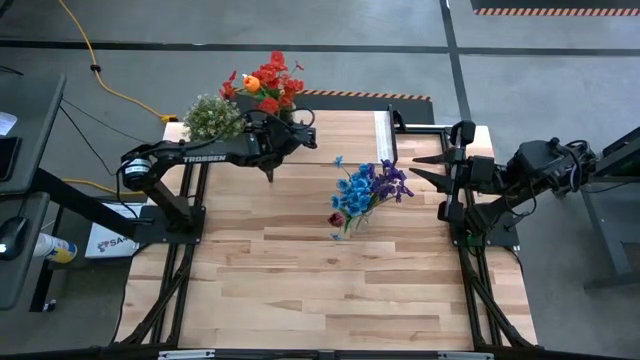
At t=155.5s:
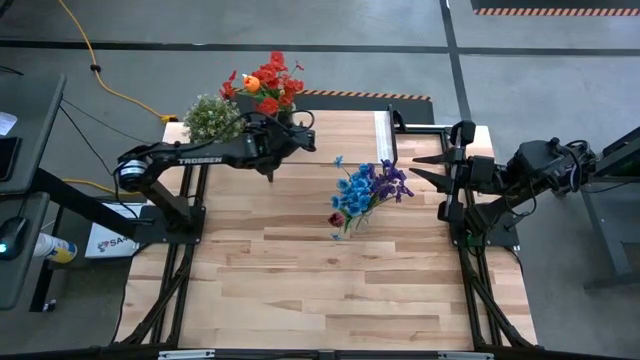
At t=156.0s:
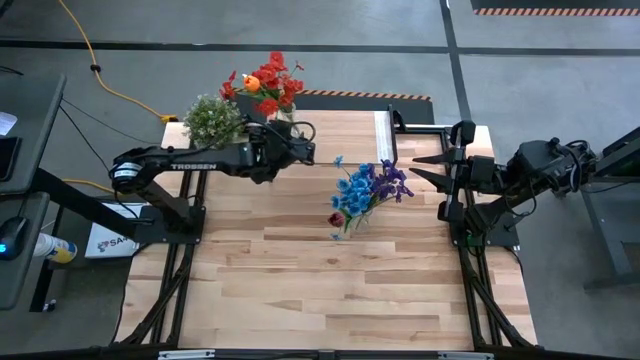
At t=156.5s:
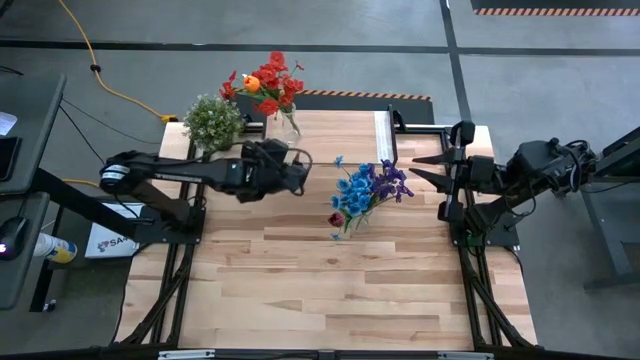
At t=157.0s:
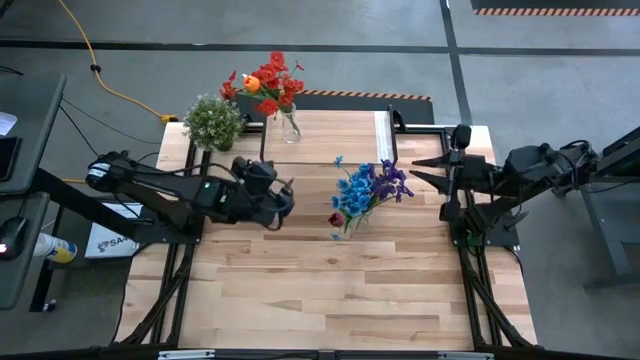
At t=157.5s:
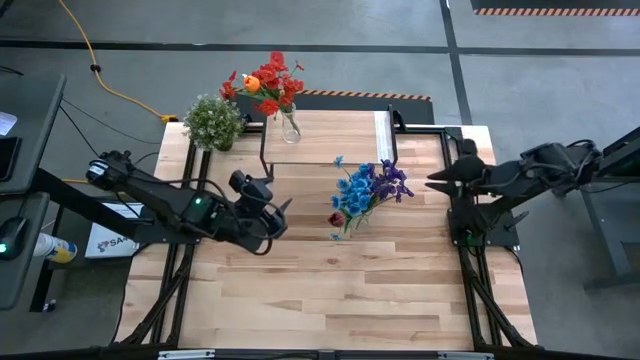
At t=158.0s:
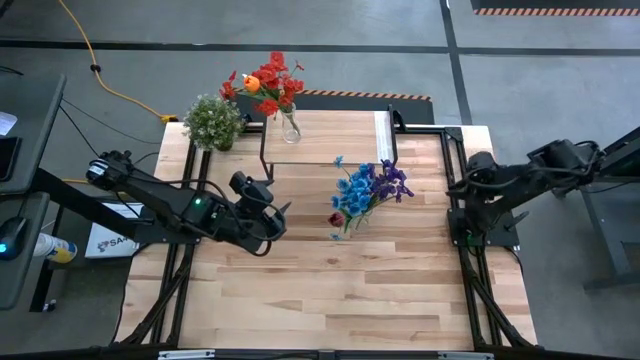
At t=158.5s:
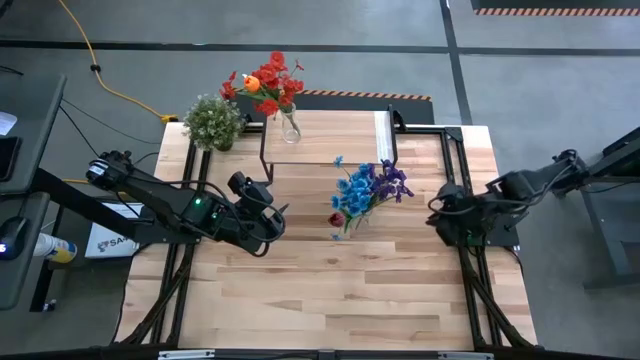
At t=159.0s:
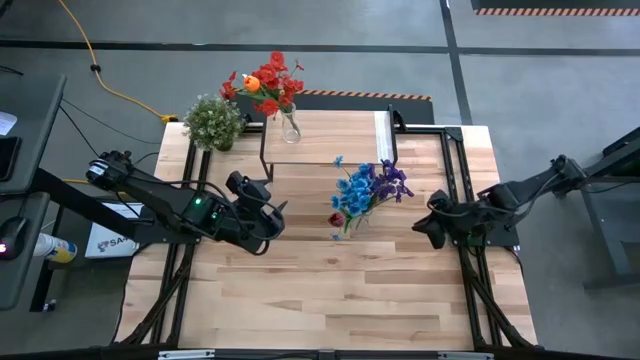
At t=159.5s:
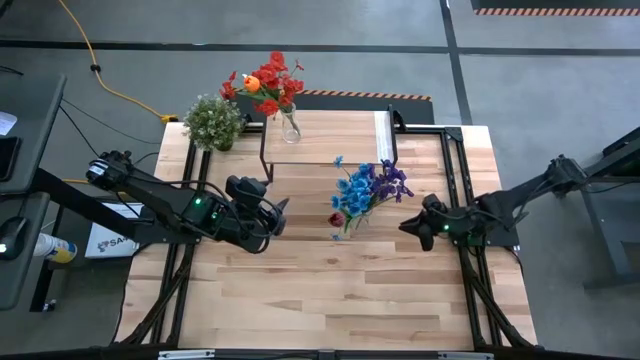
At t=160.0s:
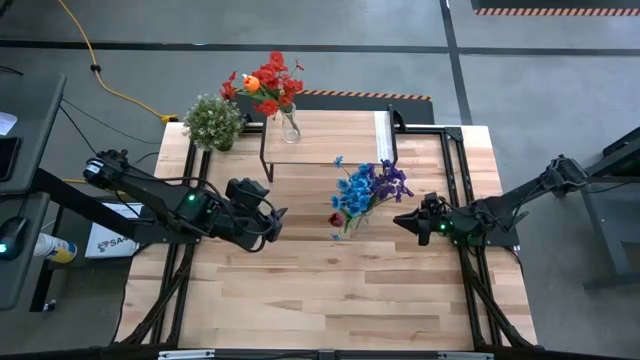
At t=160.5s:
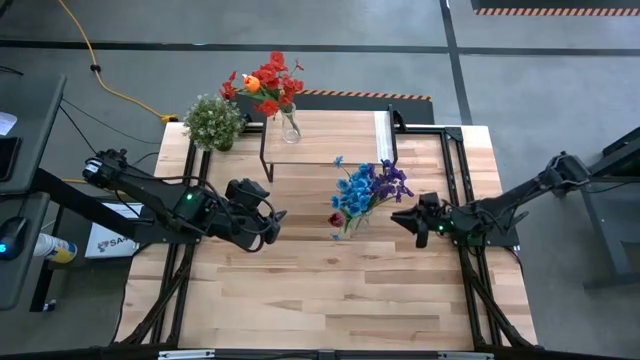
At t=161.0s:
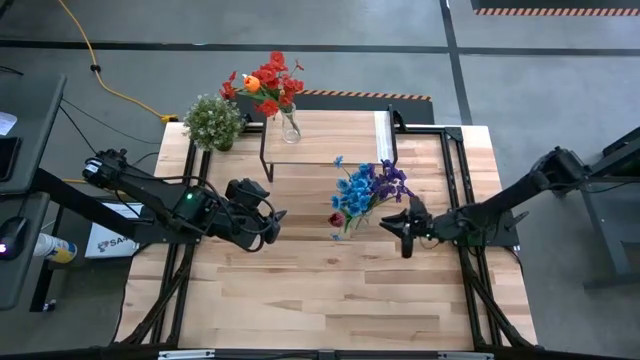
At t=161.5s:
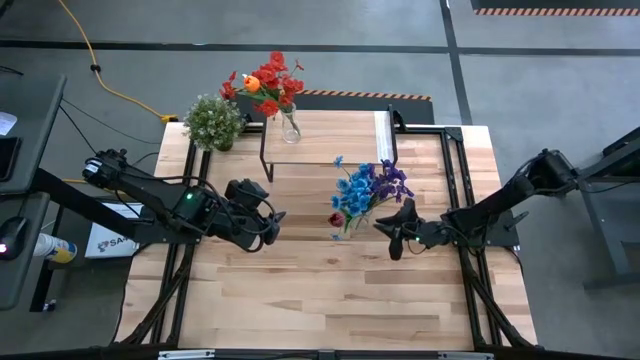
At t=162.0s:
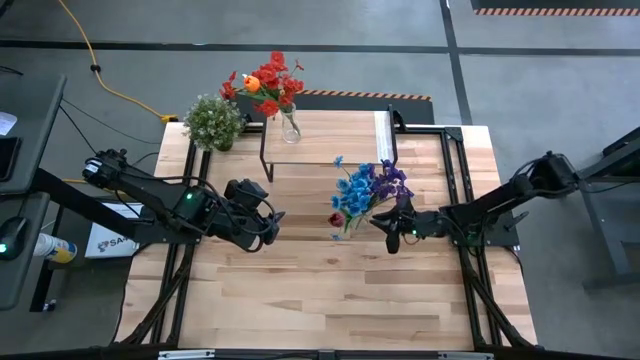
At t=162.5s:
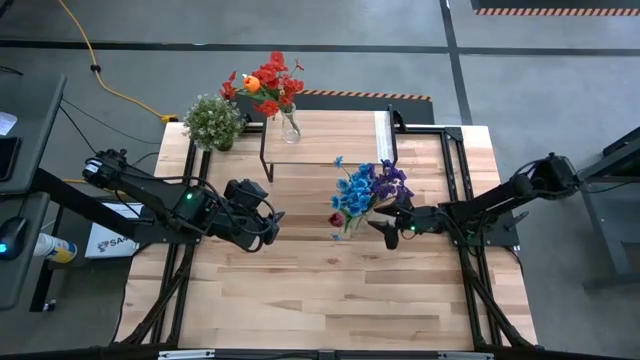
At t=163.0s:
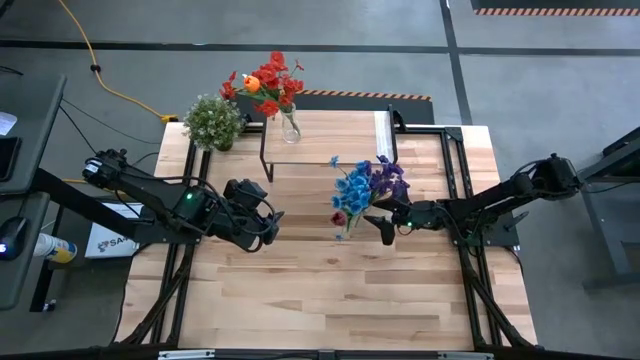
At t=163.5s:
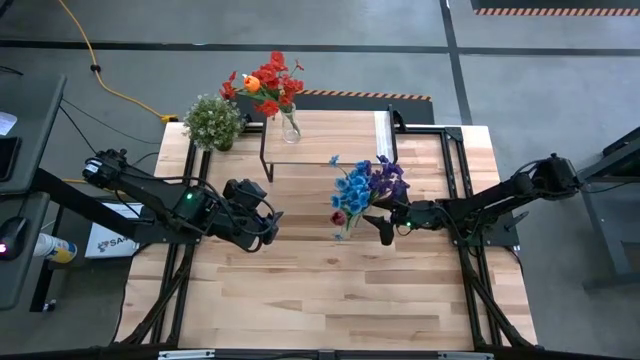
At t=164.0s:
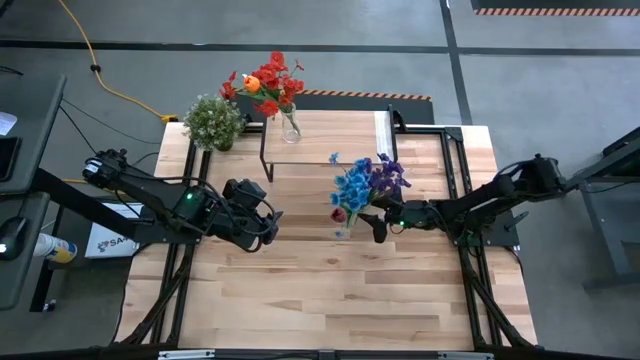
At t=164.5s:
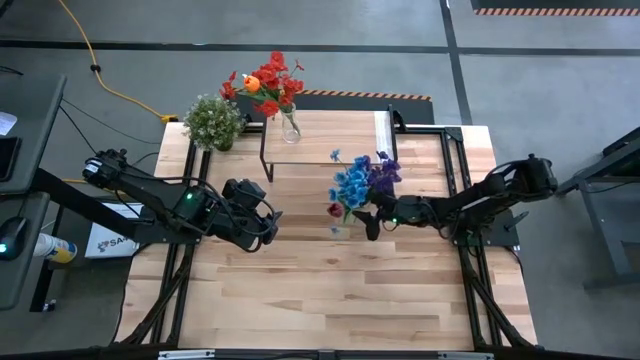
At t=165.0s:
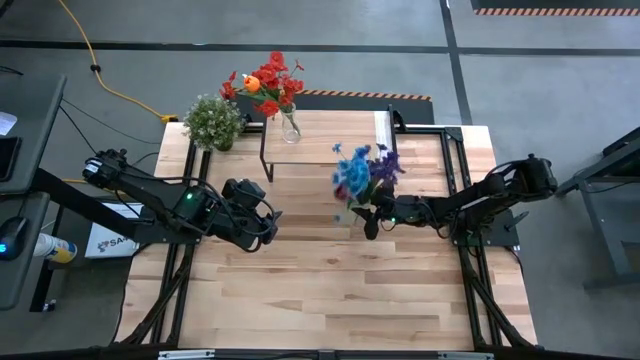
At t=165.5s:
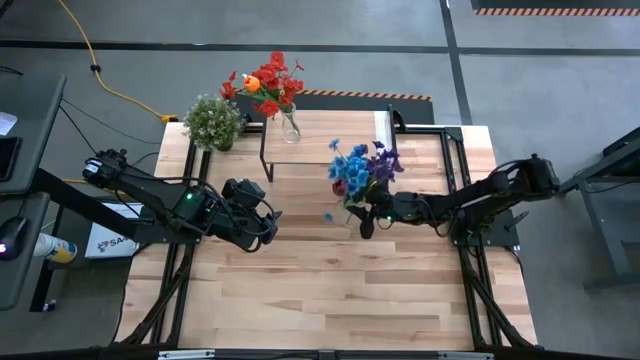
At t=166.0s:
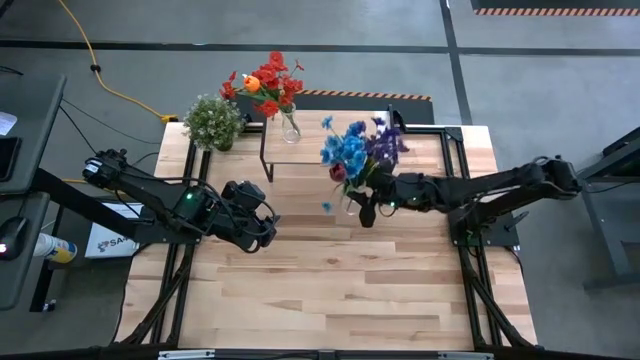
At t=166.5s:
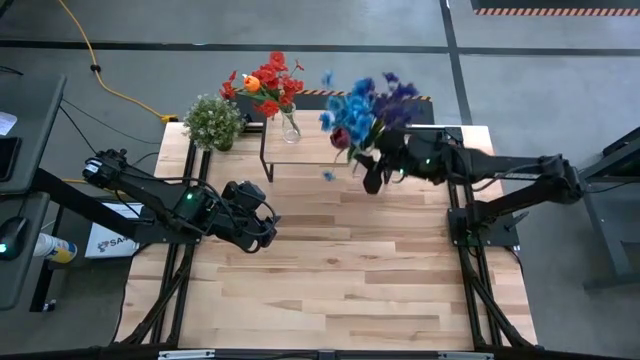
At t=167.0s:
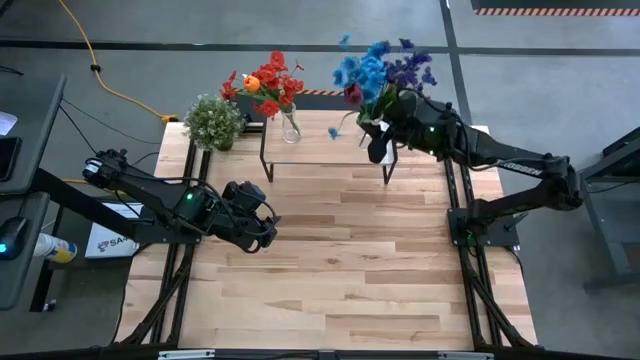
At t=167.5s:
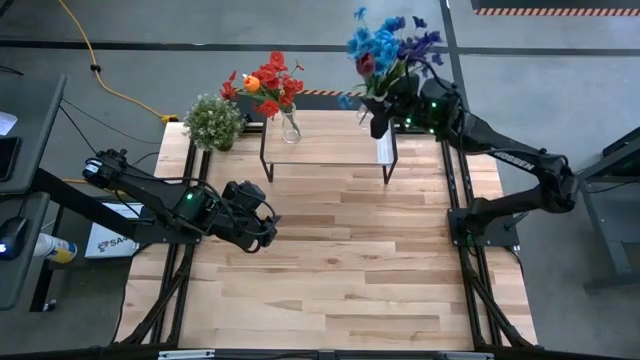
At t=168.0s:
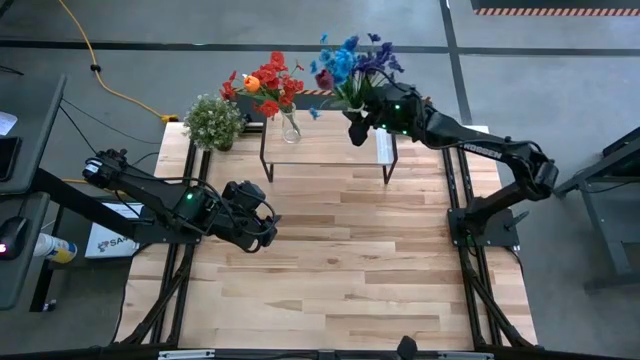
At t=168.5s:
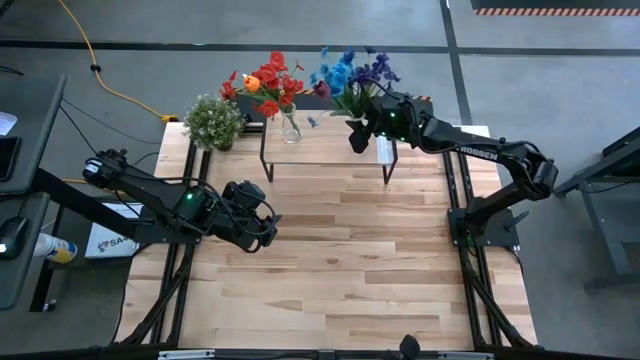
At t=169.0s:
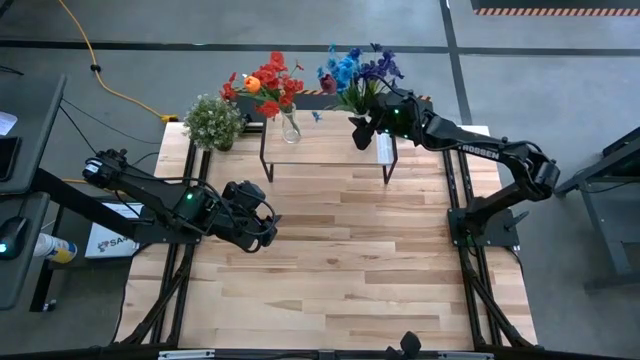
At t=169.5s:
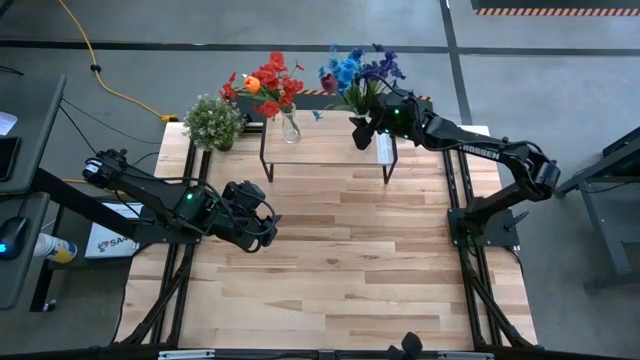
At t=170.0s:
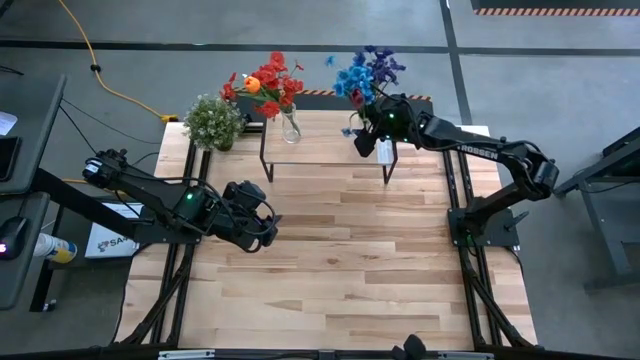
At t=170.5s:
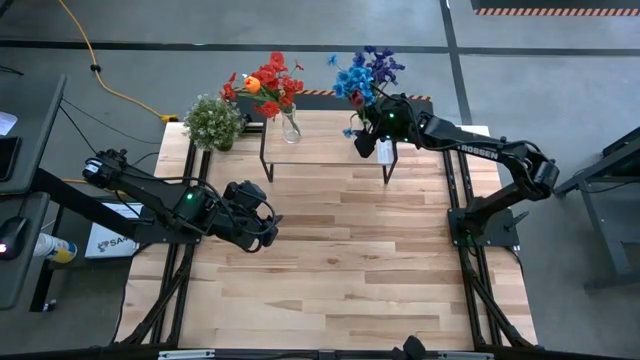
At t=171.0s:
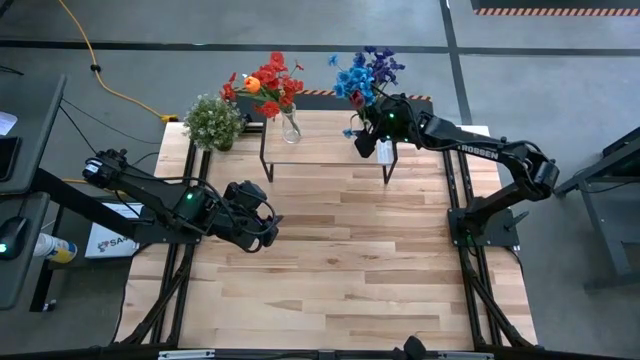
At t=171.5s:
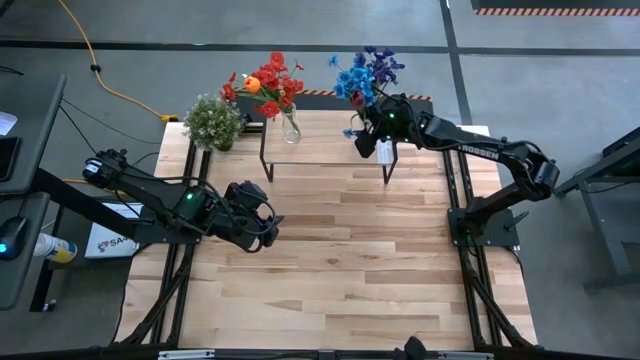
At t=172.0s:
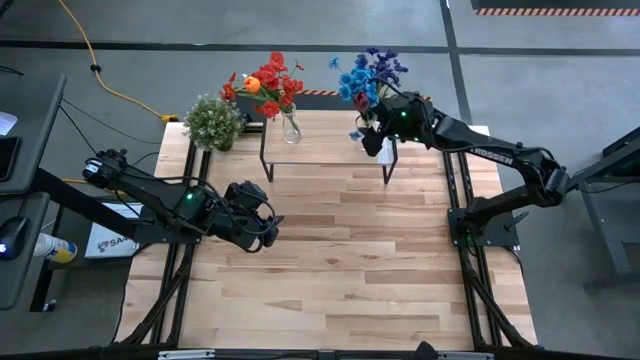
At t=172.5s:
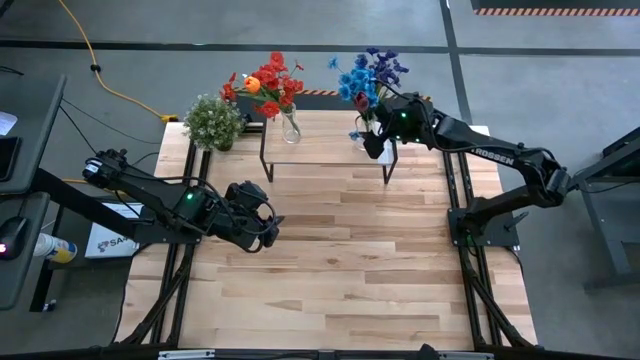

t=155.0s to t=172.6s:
Task: Pick and place flowers into a vace then onto a shelf
Put the transparent vase with flowers on the shelf

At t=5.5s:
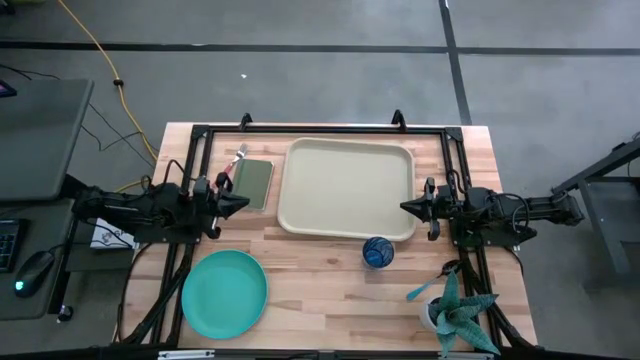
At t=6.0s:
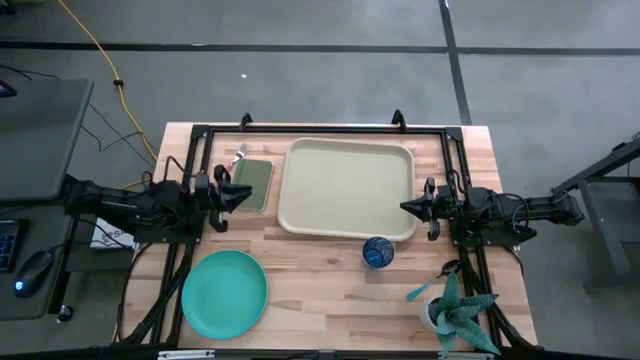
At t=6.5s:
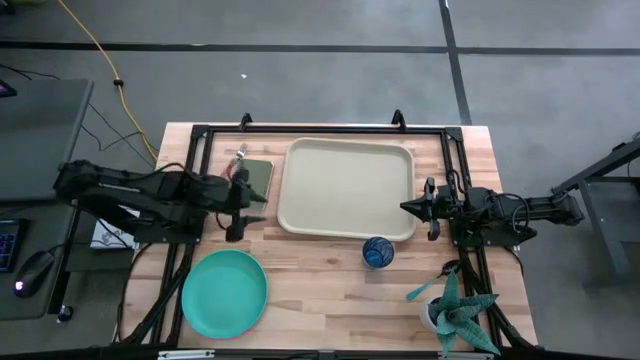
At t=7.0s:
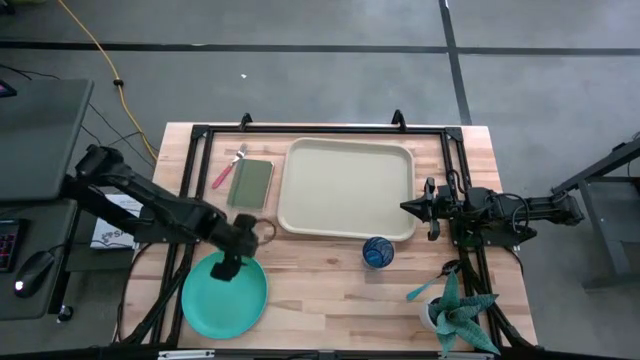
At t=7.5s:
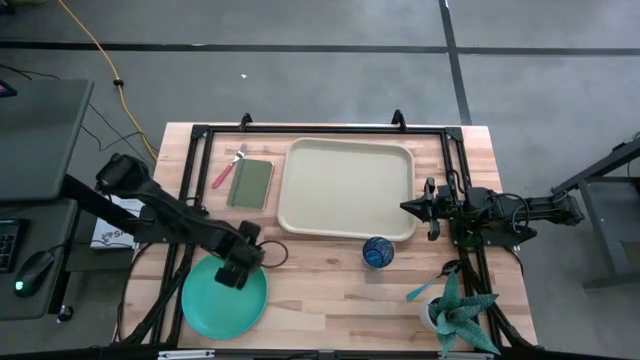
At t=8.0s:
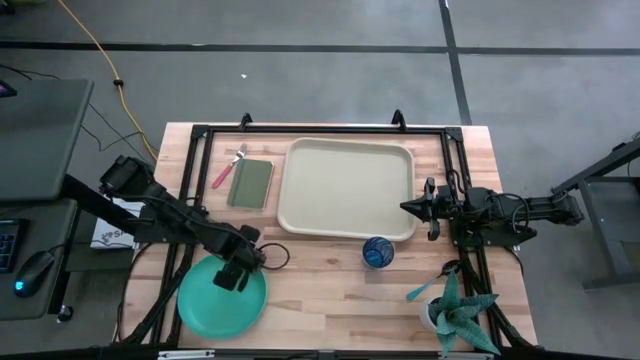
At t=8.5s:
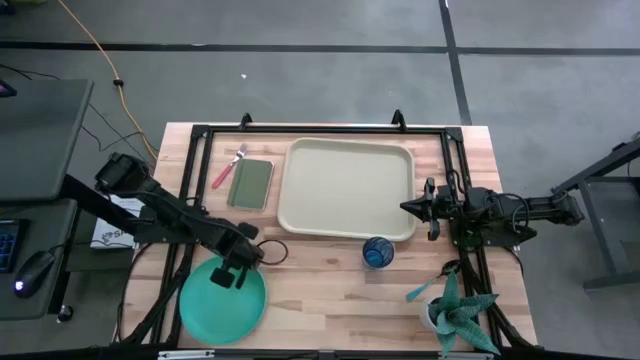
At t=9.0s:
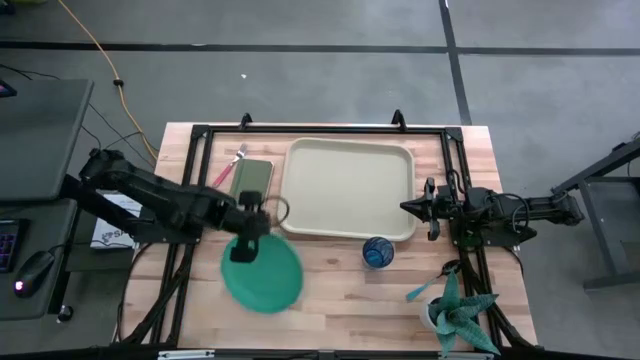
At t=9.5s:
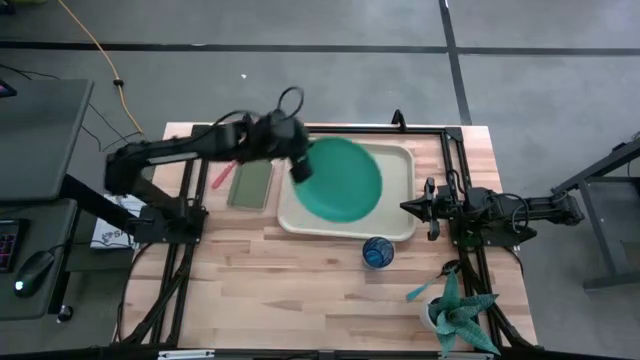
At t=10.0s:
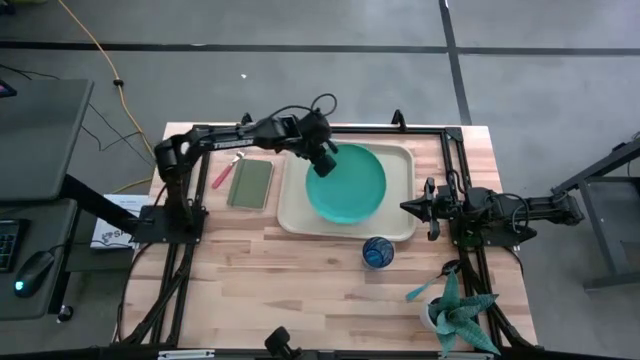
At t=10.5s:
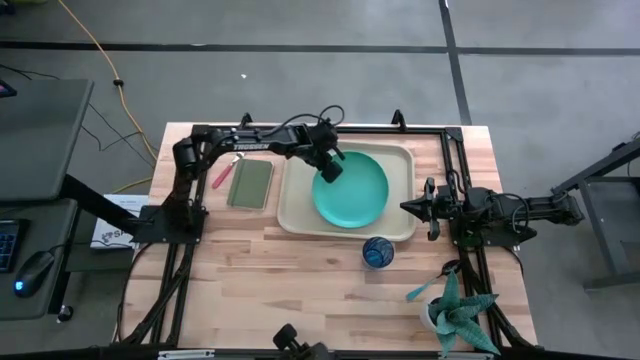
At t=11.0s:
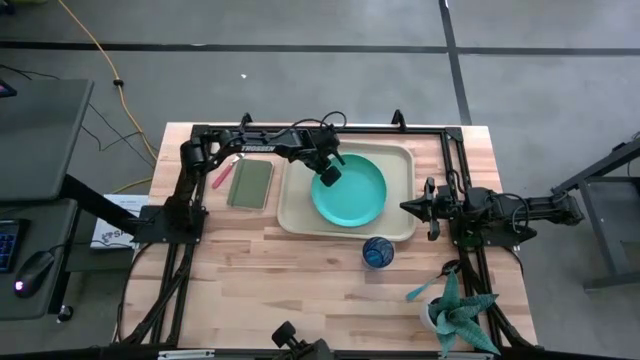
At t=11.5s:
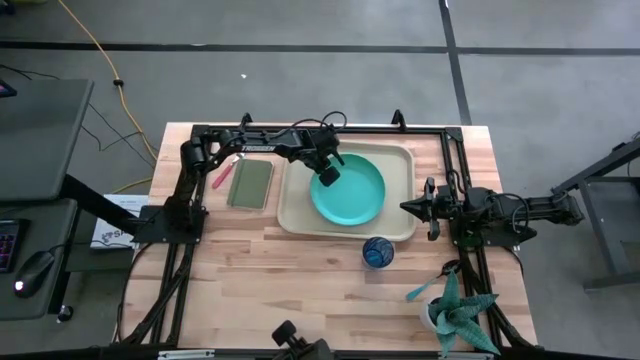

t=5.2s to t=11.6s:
Task: Pick and place plate/cup/fork/spoon on tray
Put the light blue plate on the gray table tray
